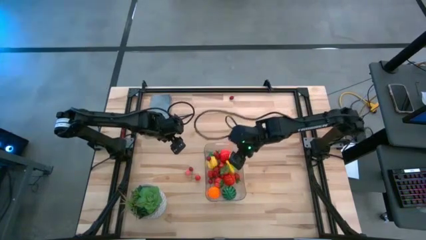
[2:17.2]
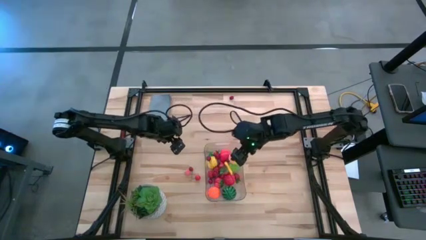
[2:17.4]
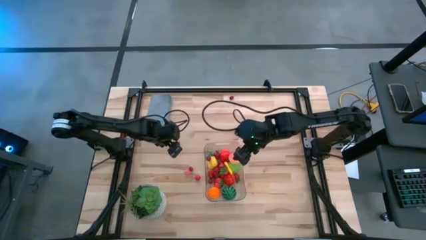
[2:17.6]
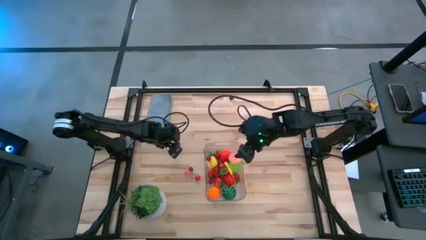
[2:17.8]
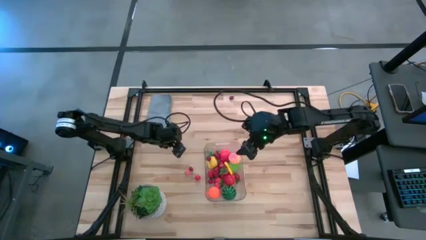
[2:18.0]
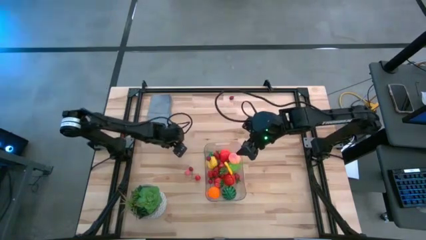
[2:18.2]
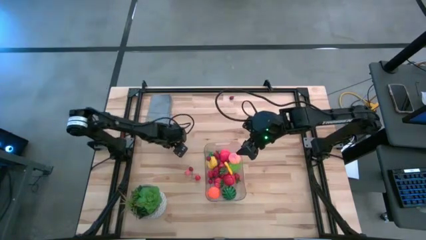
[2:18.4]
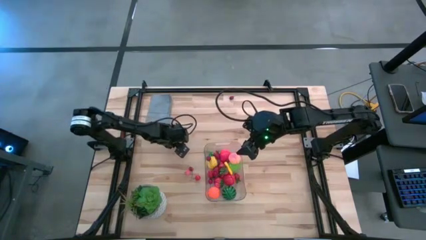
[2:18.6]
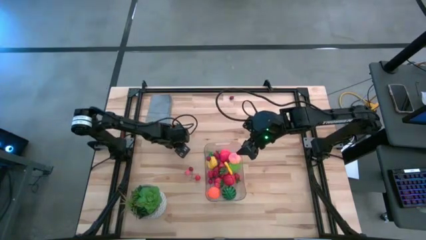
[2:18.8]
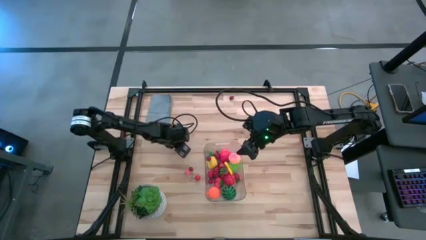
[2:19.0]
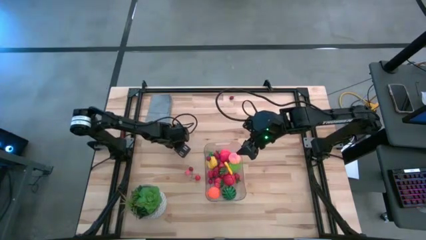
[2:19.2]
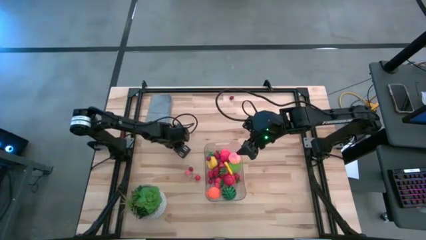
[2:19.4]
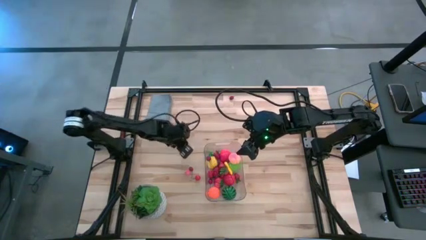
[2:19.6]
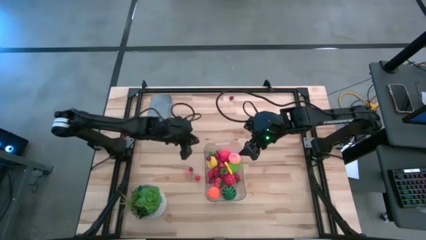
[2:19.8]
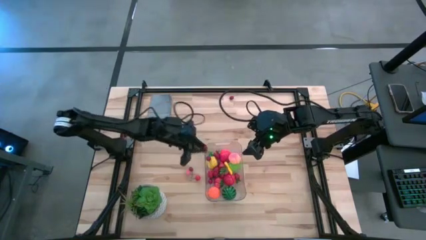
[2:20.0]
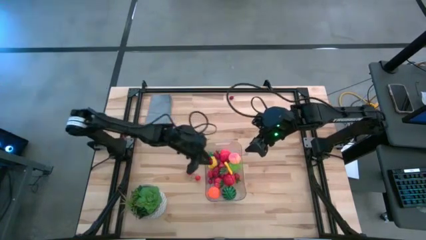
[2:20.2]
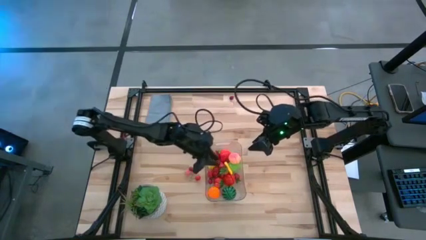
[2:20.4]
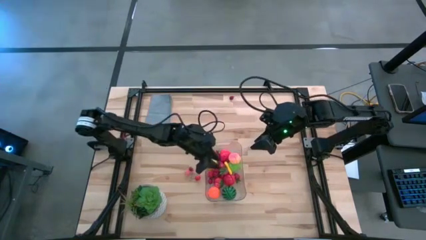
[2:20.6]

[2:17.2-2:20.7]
Task: Pick and placing Produce into tupperware
Put the cherry into the transparent bin

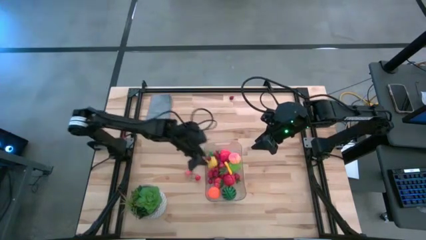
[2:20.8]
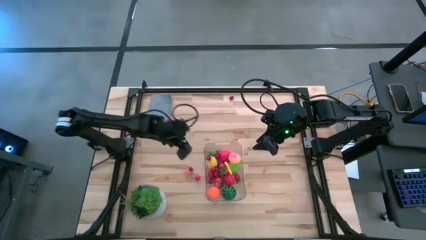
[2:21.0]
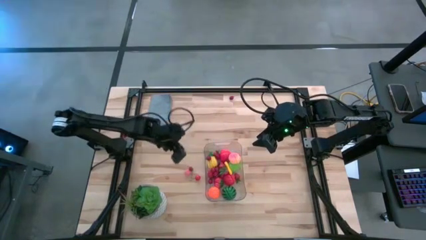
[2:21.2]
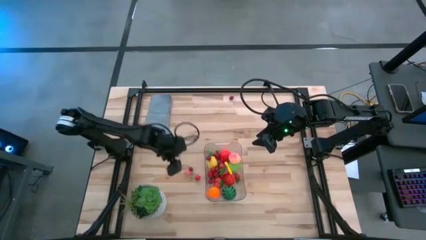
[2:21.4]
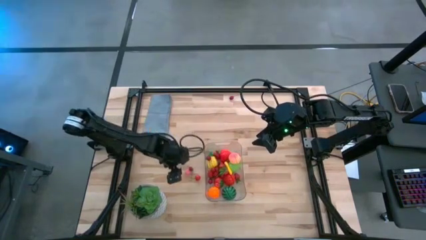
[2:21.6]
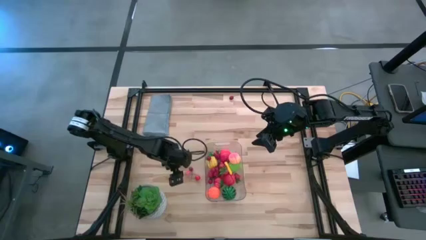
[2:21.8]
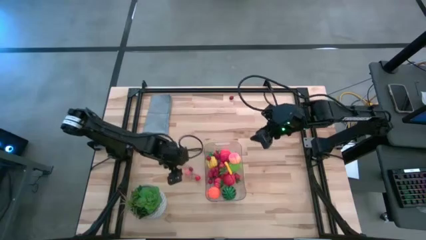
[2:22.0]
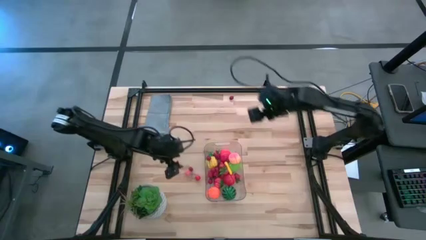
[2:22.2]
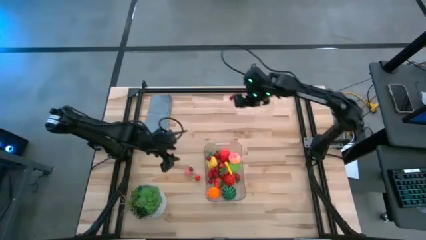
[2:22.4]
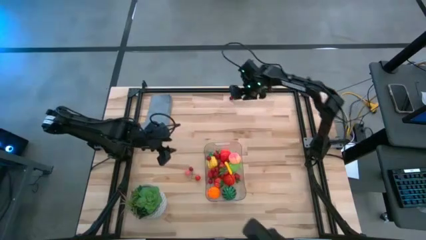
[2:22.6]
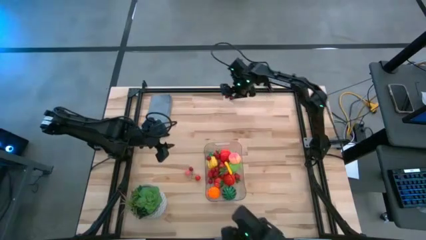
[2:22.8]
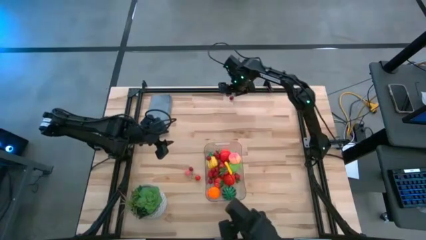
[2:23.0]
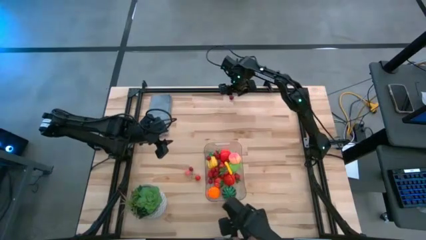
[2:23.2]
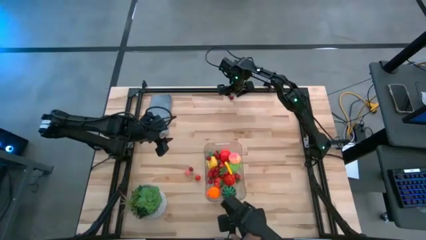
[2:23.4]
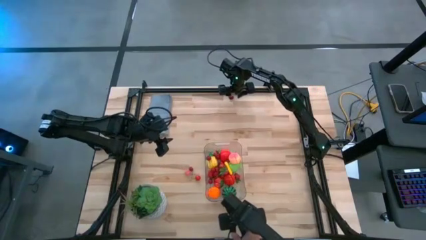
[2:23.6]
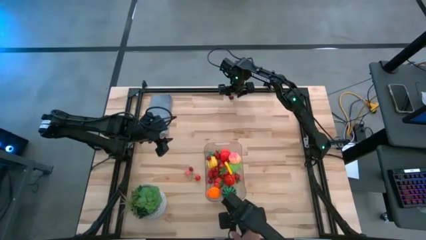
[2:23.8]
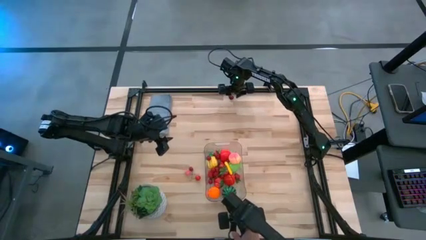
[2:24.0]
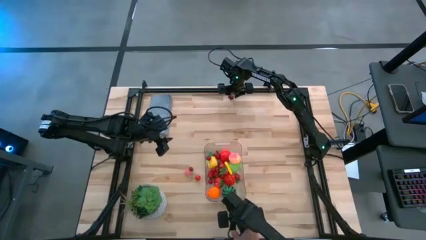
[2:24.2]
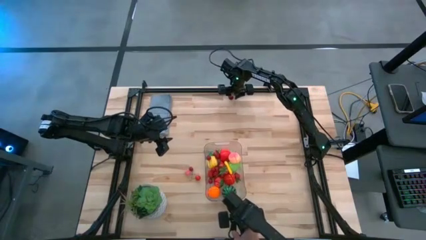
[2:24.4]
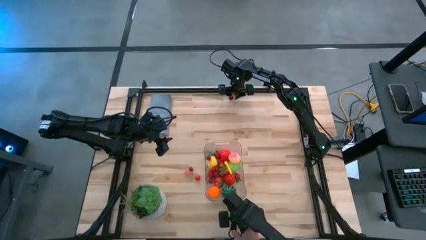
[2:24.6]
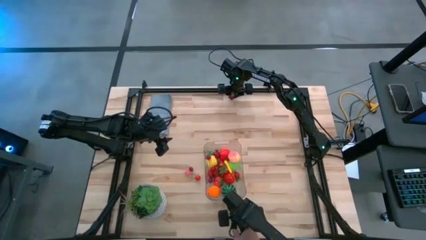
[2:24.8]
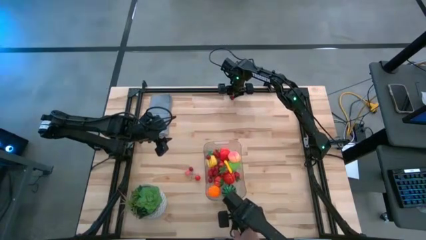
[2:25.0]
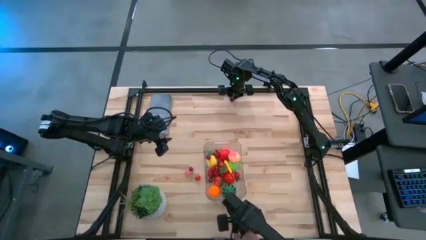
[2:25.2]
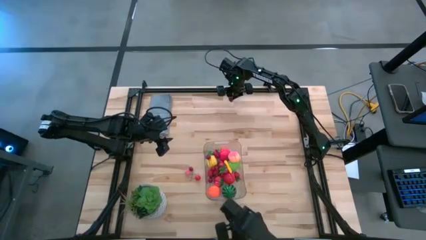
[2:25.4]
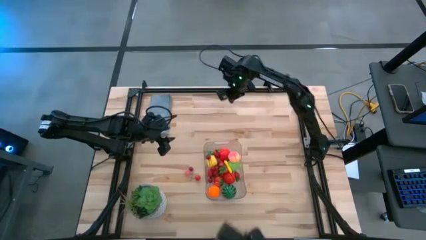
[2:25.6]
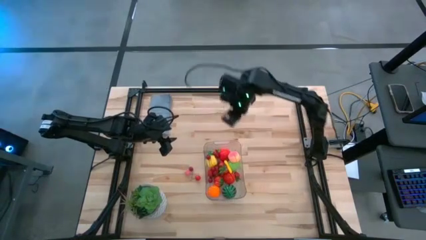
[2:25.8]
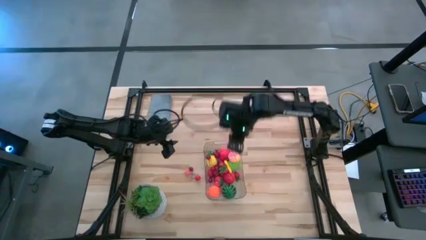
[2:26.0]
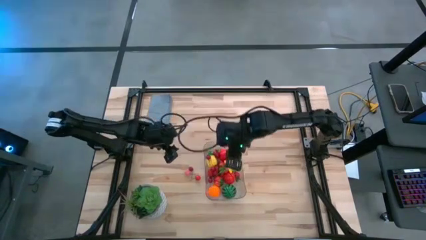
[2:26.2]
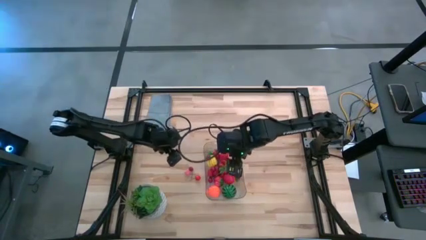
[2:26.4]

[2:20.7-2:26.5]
Put the cherry into the transparent bin

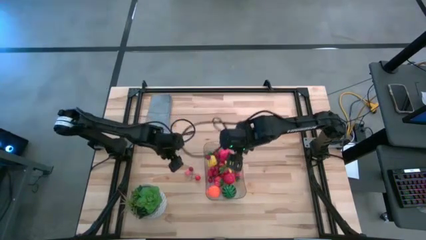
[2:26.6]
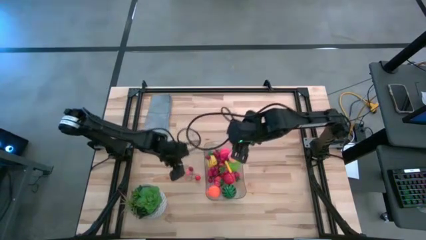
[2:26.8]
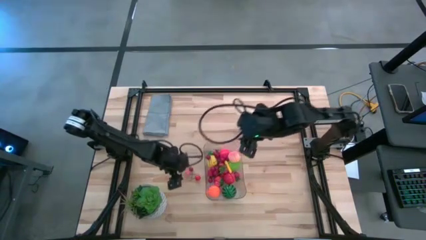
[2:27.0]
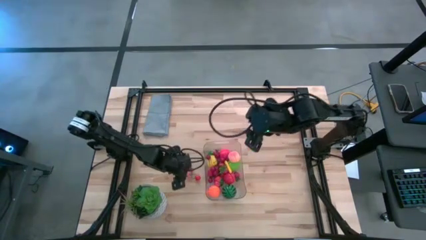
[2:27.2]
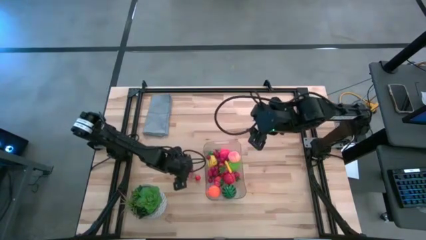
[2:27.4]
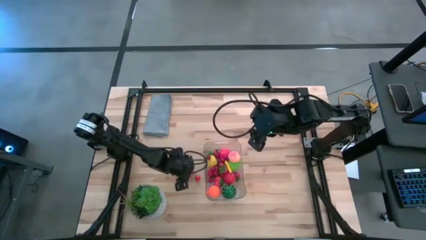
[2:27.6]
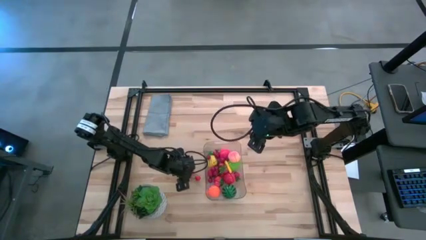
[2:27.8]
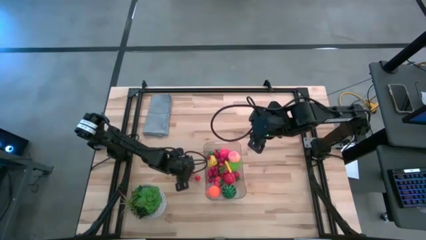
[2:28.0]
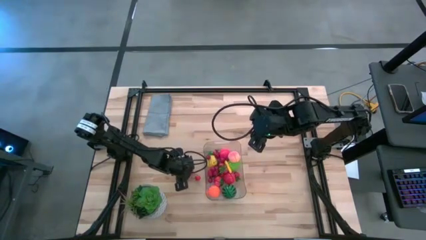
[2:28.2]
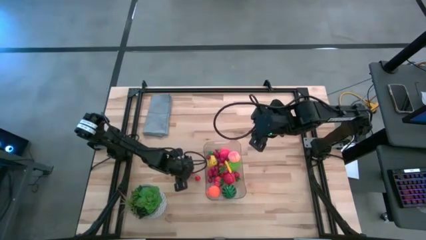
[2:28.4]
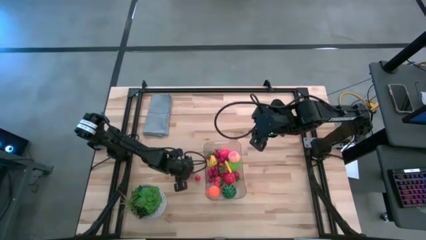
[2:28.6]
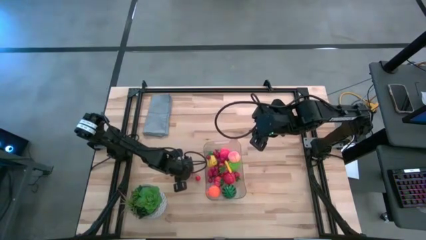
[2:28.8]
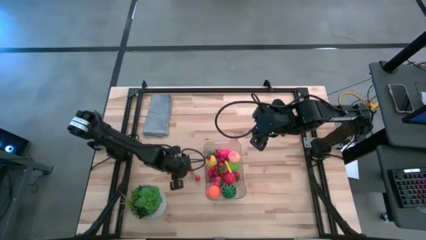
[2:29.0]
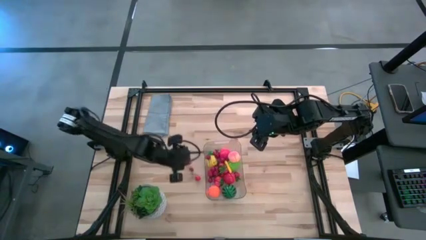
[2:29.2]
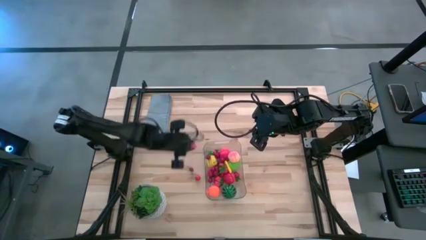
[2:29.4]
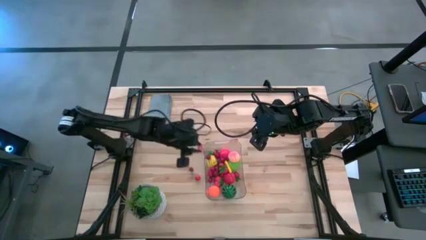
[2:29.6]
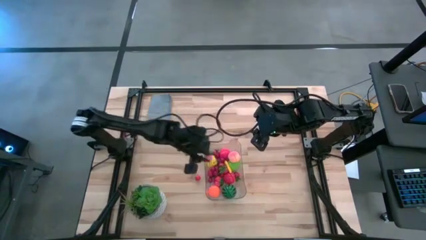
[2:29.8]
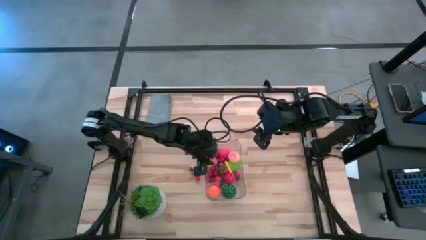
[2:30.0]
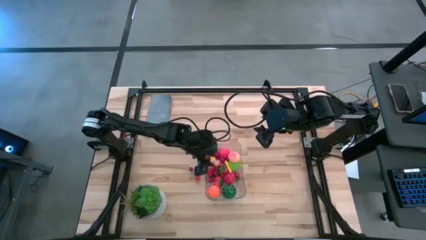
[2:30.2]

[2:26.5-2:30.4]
Put the peach into the transparent bin
